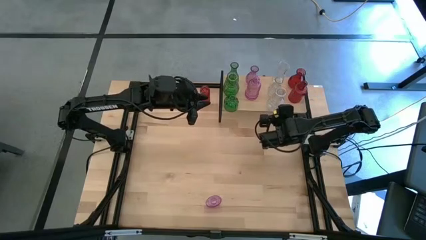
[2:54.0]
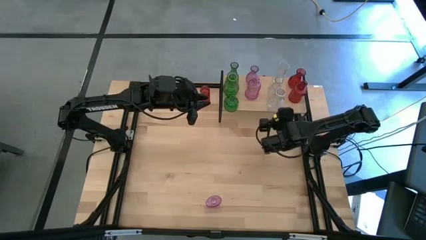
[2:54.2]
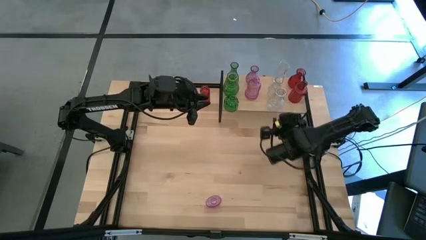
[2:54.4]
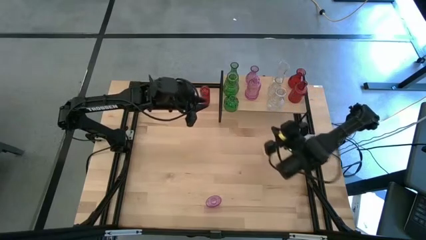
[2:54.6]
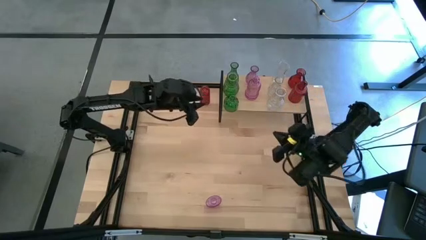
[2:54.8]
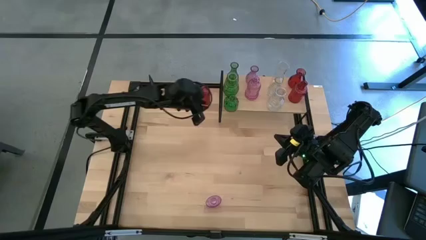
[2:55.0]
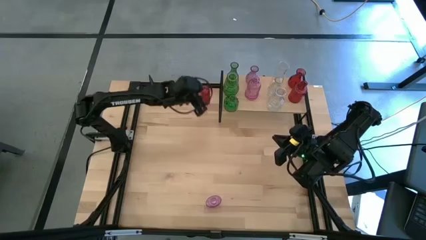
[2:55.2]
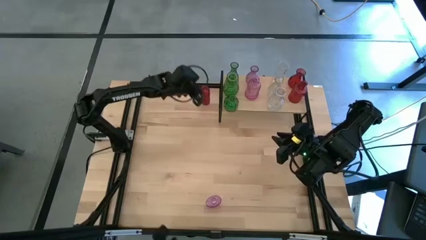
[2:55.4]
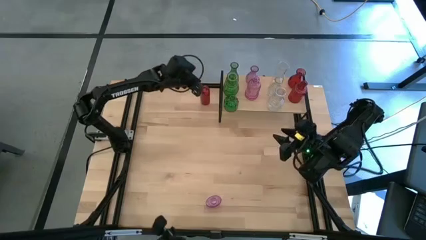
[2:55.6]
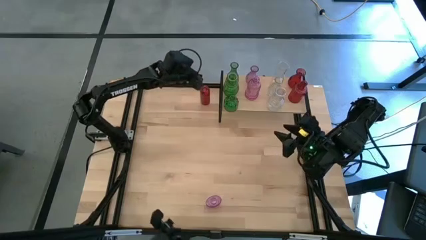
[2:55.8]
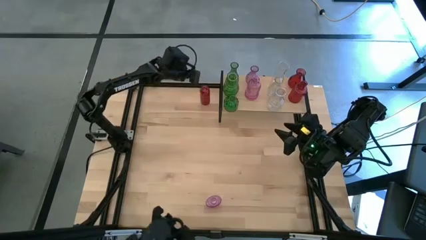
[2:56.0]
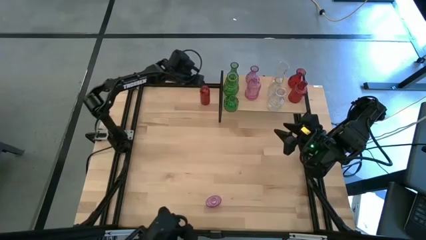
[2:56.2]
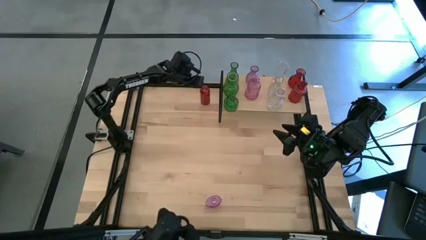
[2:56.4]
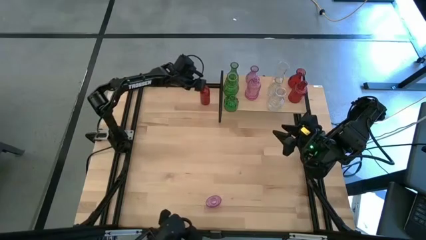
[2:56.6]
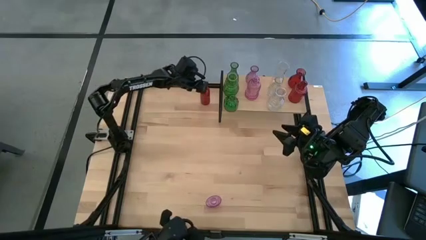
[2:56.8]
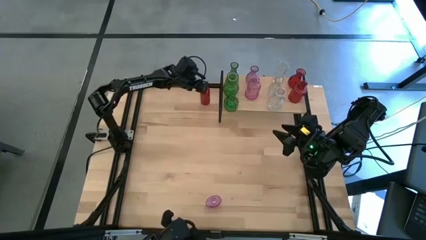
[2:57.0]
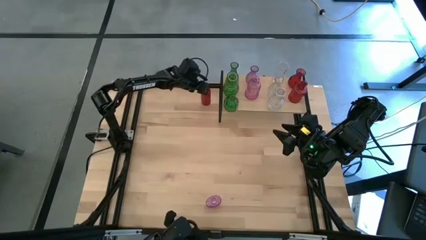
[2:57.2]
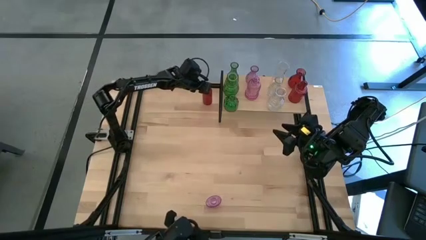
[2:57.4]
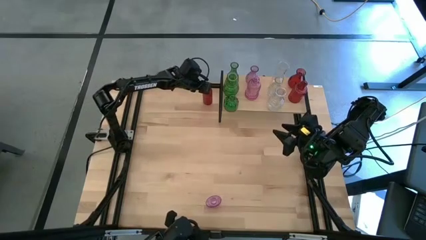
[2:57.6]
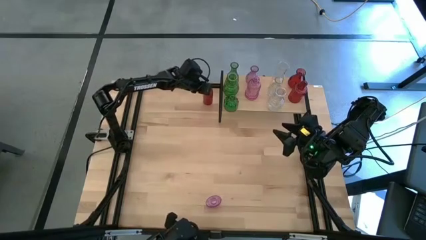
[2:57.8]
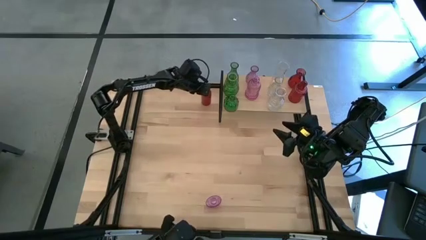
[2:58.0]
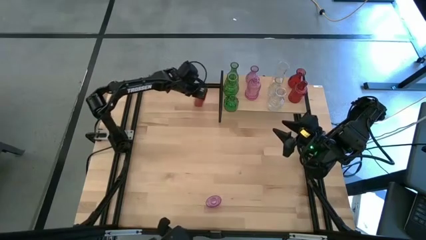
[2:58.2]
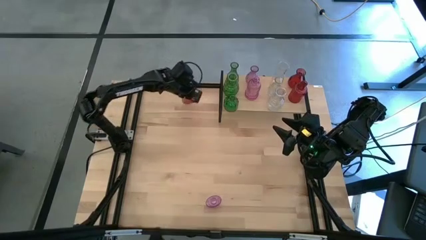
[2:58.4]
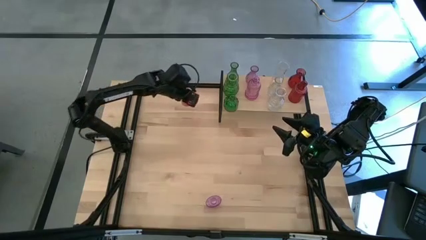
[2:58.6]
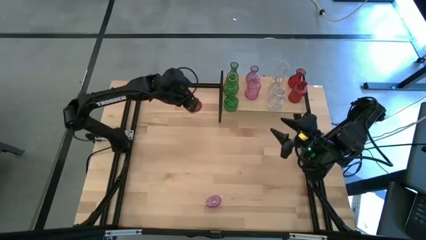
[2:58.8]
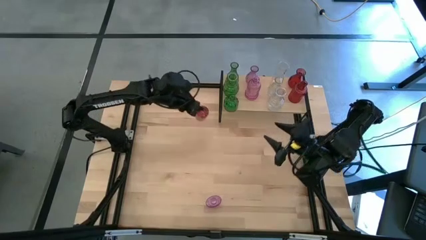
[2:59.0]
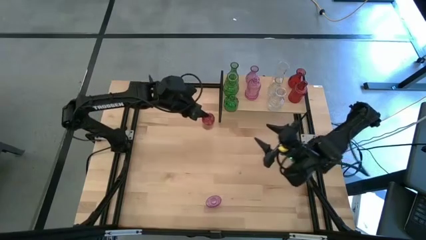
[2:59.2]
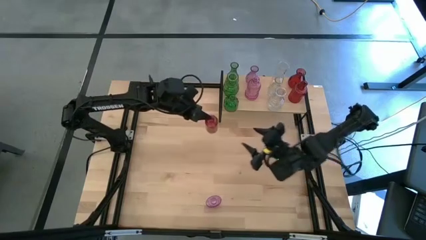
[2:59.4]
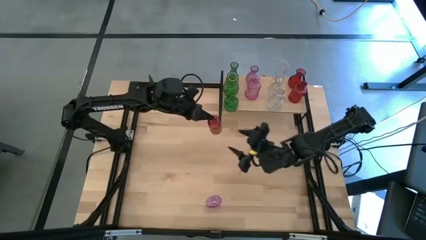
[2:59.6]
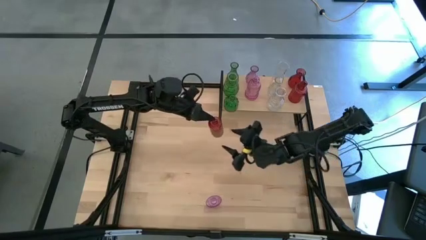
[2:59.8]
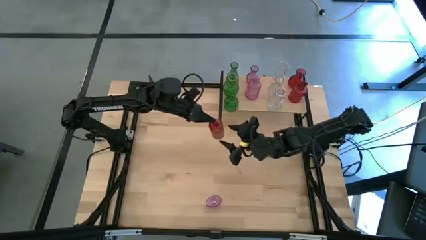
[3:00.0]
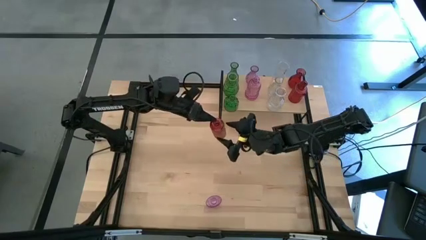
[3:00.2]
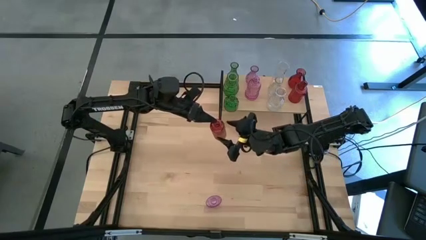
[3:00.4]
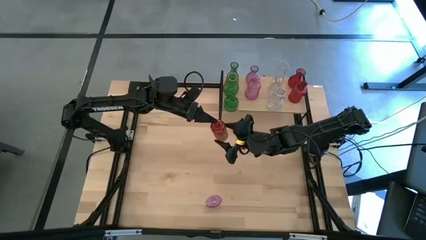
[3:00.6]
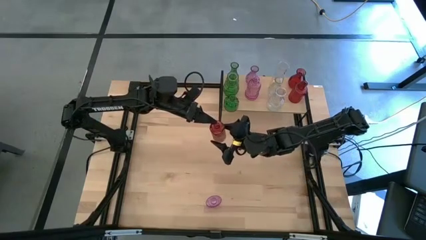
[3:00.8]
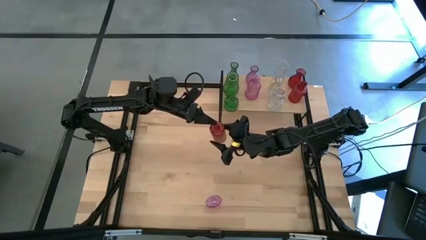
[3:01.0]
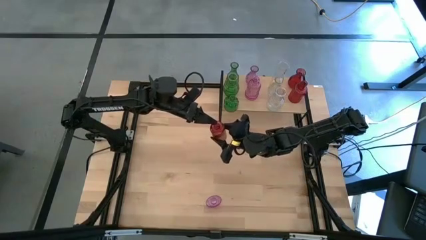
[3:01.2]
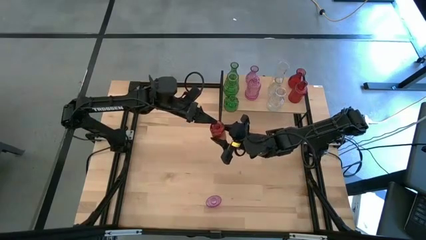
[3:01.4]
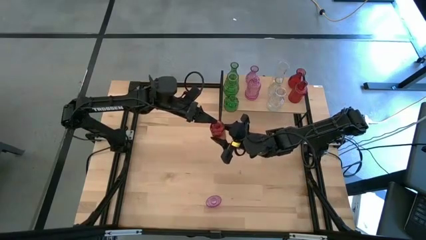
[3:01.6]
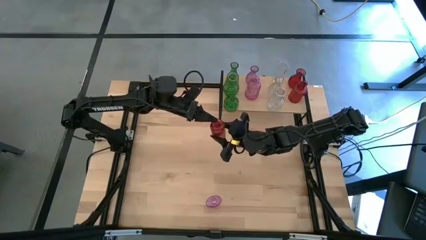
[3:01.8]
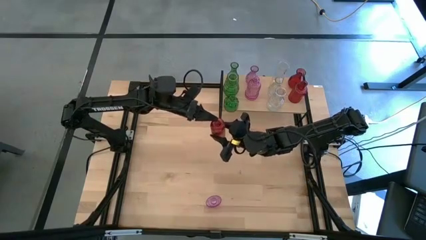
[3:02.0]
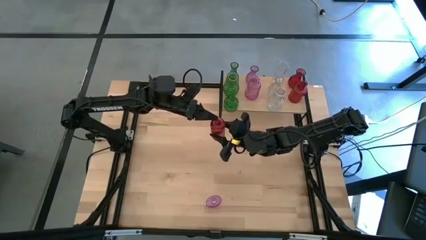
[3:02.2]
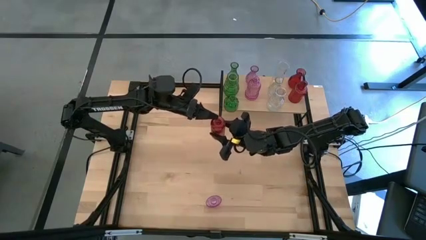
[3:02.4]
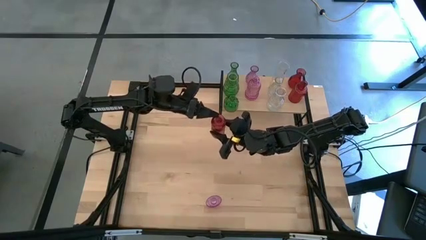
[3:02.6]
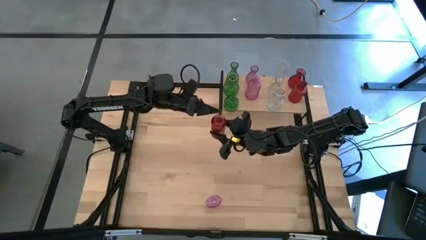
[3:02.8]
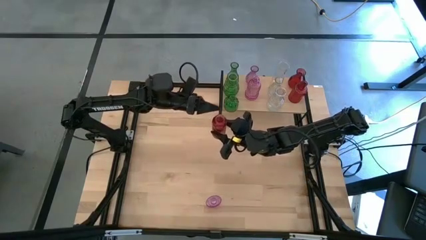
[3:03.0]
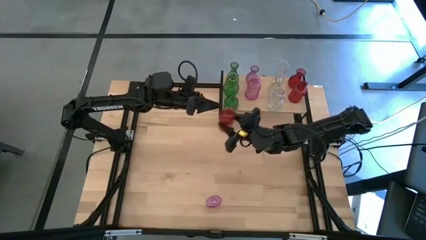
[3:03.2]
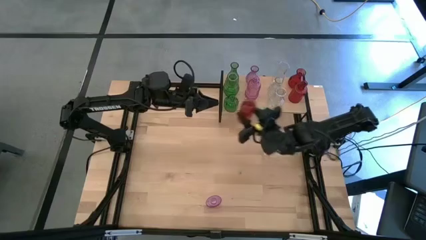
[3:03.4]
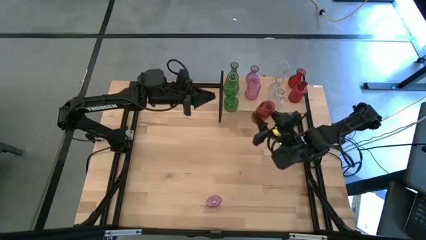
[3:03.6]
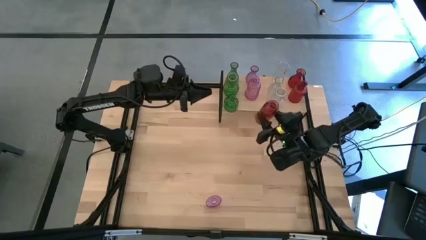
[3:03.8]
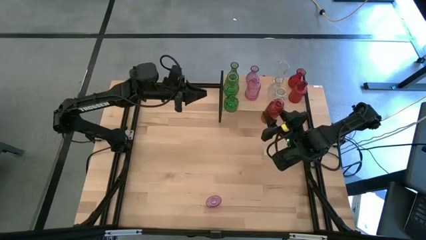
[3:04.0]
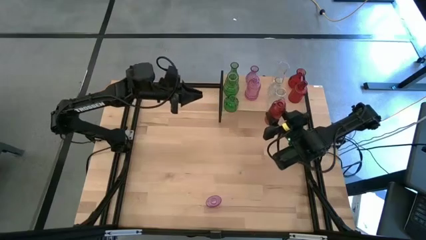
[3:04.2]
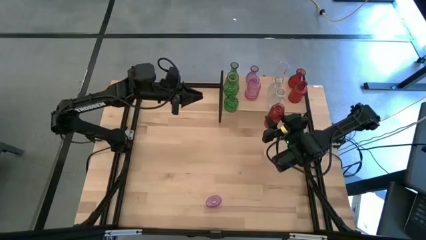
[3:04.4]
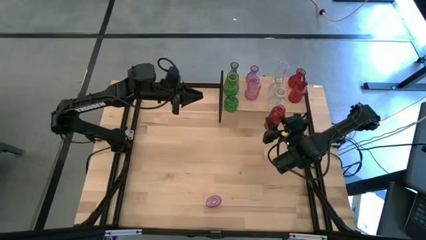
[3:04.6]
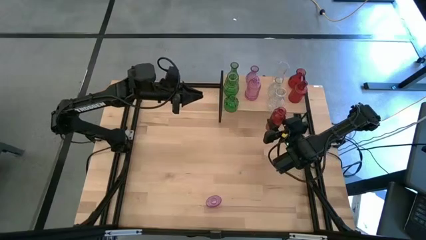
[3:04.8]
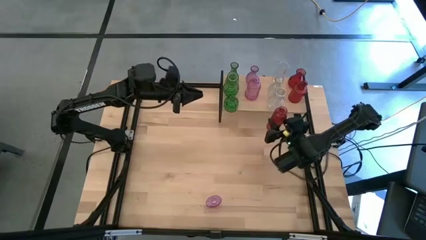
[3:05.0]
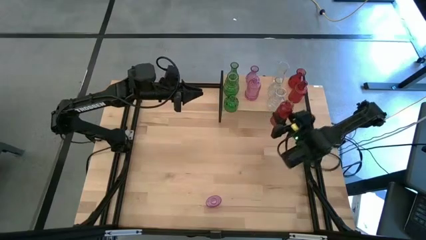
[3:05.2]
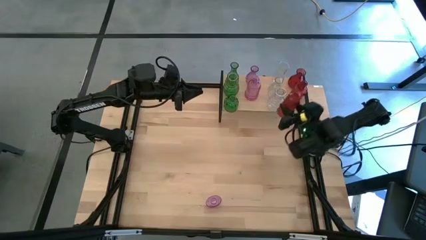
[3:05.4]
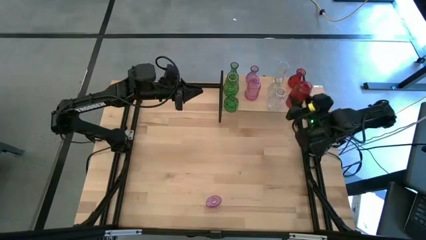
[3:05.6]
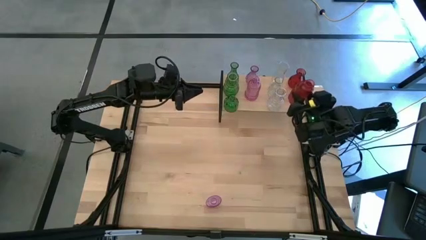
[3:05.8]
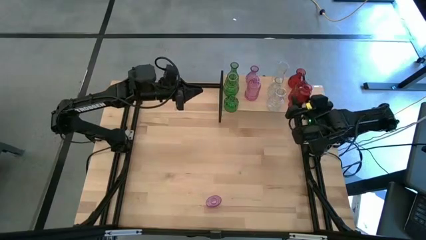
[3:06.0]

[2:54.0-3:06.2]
Task: sort vases onto shelf
Put the red vase on the shelf aligned with the other red vases

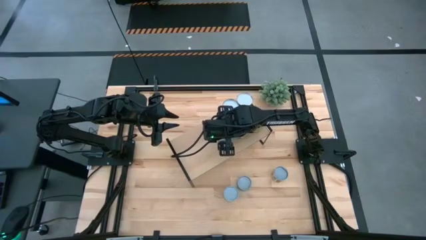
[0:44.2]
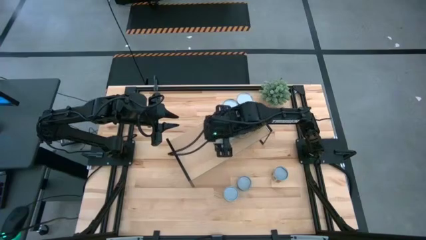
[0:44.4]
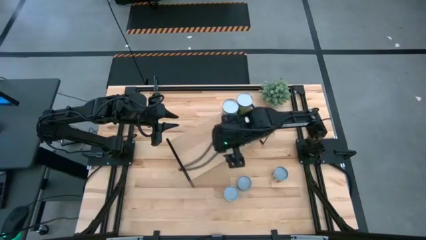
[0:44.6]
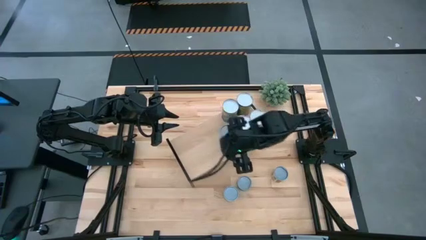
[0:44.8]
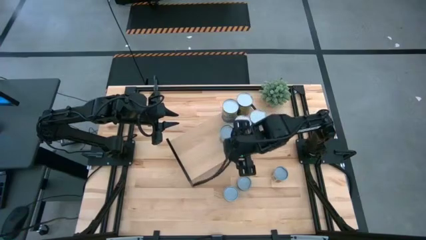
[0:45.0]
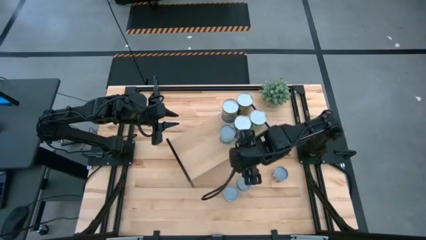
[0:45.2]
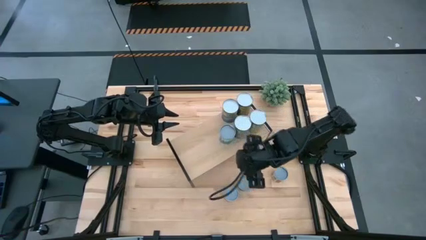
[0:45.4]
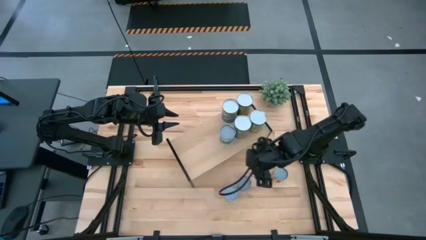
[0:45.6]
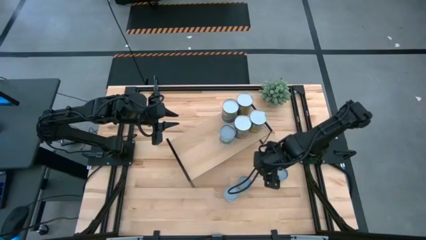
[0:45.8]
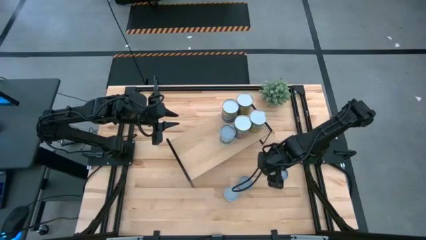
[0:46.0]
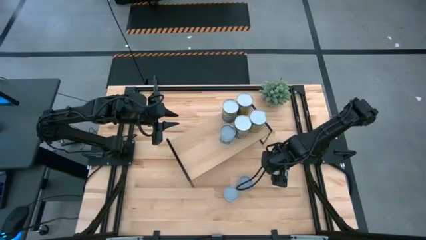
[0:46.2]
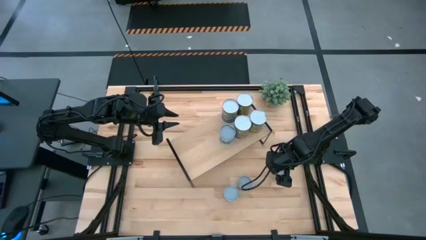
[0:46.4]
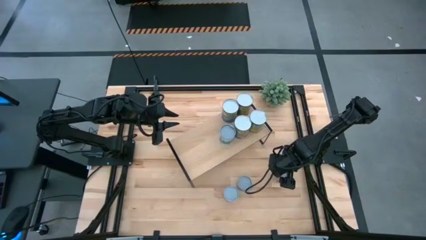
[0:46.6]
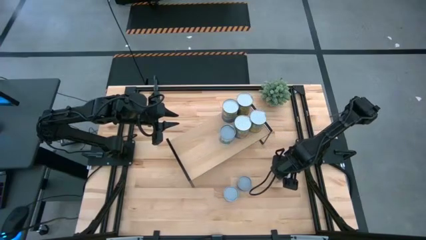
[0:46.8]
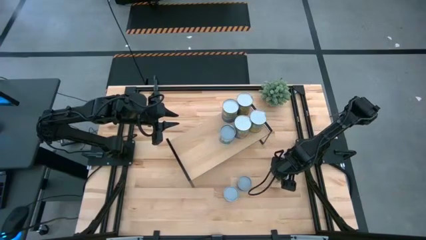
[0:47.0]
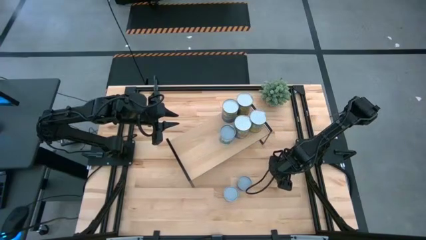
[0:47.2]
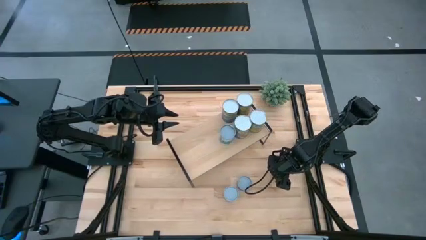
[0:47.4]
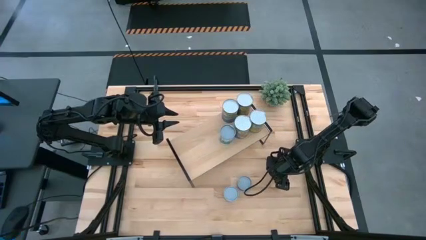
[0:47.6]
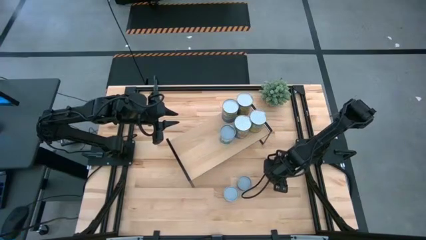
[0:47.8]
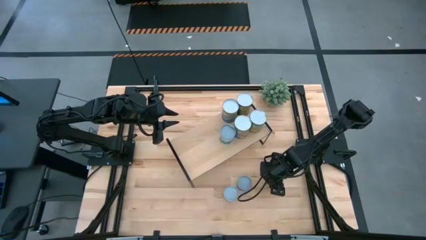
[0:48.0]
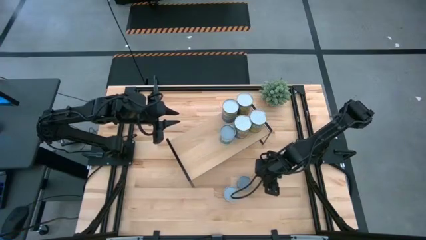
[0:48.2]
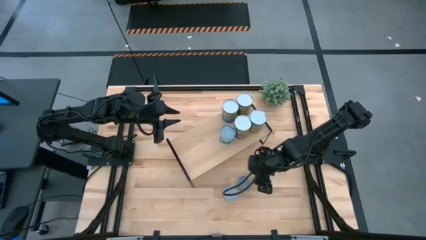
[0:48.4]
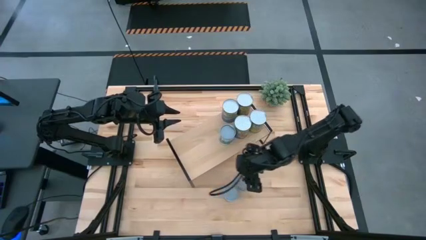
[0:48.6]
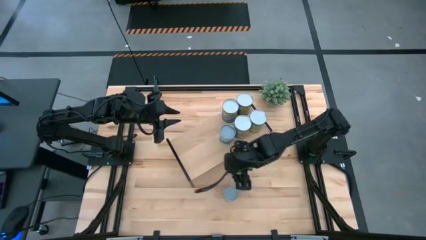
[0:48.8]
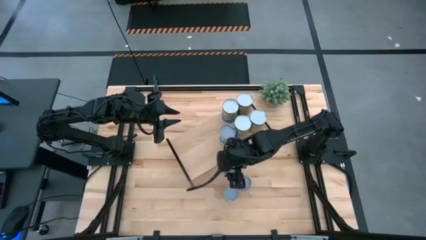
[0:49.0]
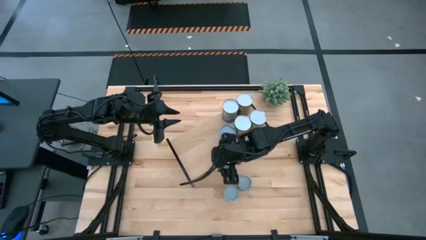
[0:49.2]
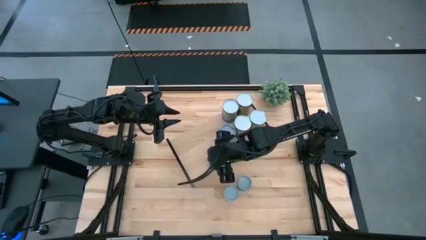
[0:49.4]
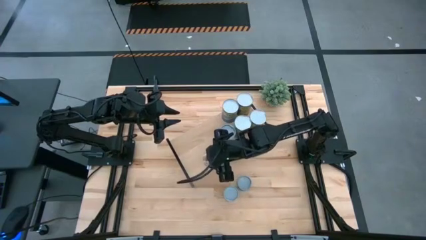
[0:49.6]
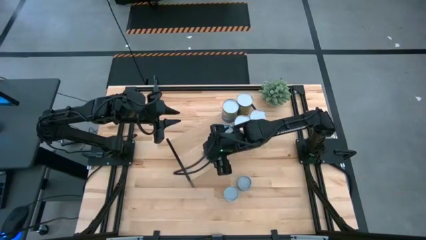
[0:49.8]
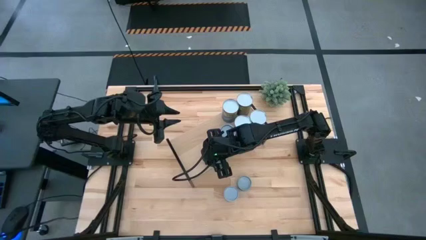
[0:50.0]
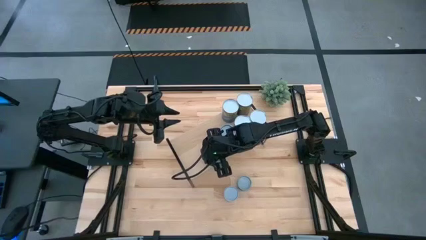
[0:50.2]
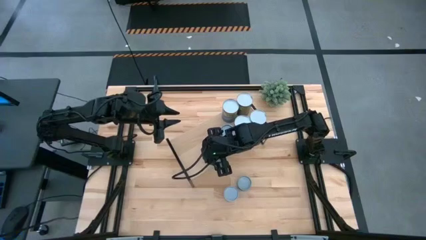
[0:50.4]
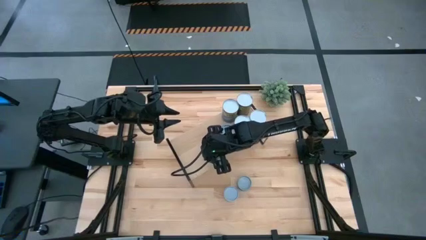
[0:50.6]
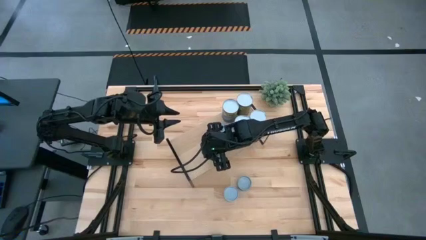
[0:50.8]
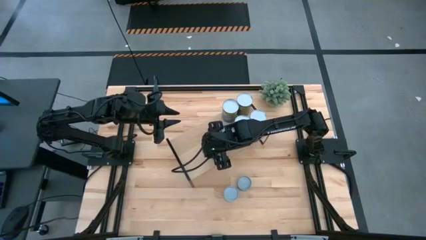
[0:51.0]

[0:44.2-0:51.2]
Task: Pick and place cans onto a shelf
Put the small canned diced tomatoes on the shelf
